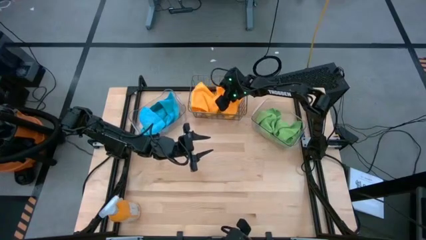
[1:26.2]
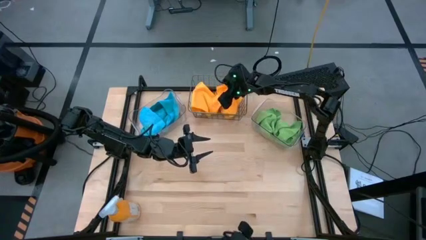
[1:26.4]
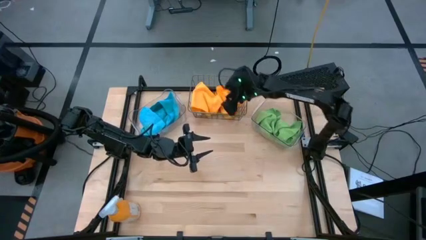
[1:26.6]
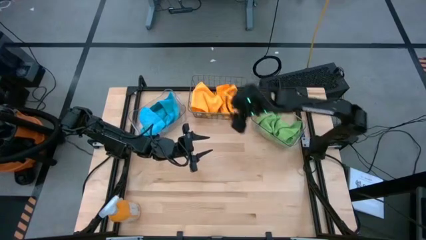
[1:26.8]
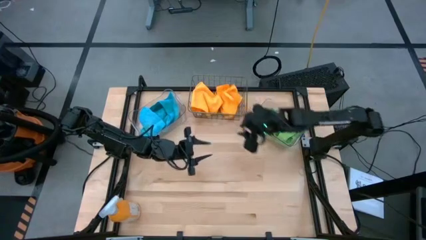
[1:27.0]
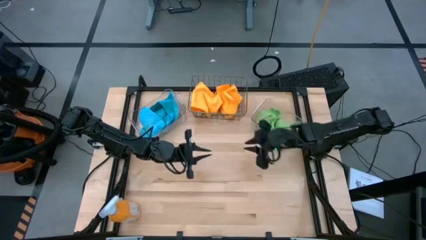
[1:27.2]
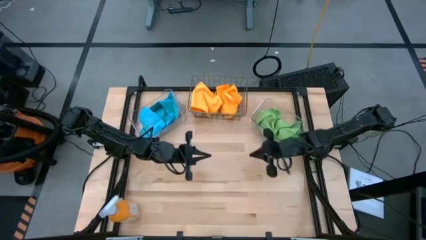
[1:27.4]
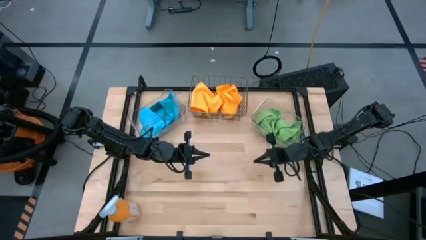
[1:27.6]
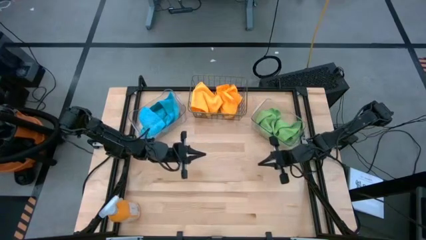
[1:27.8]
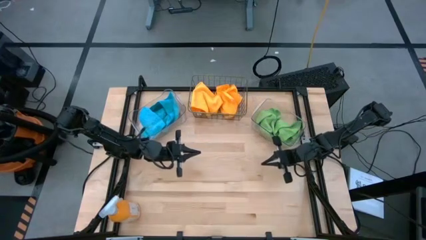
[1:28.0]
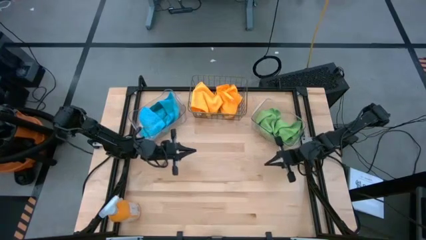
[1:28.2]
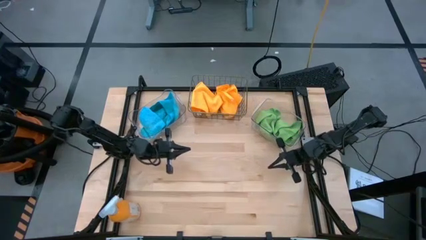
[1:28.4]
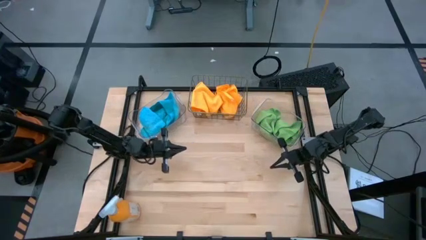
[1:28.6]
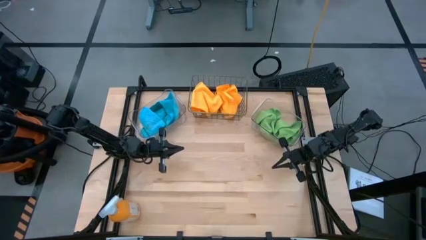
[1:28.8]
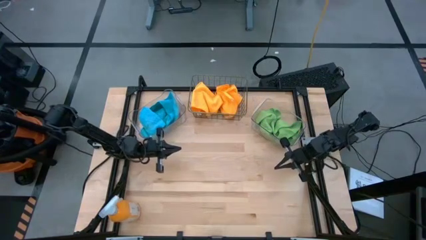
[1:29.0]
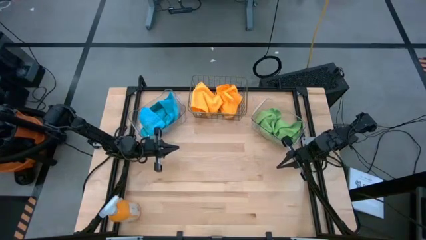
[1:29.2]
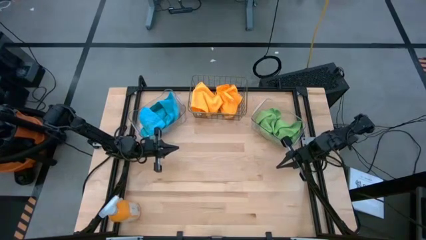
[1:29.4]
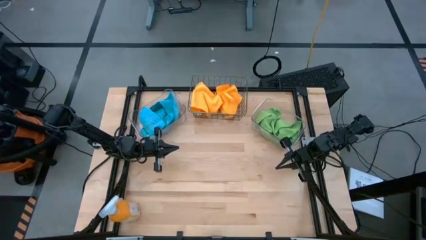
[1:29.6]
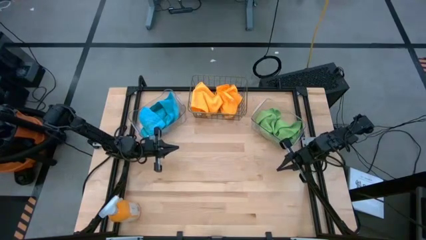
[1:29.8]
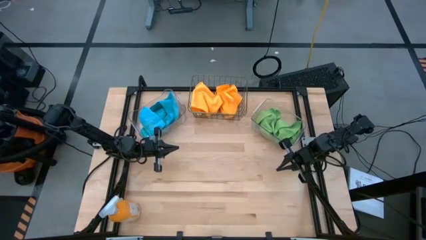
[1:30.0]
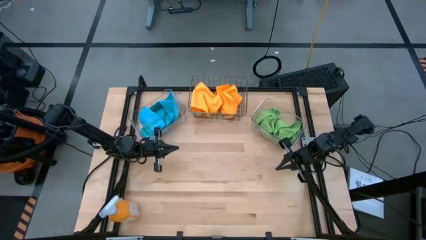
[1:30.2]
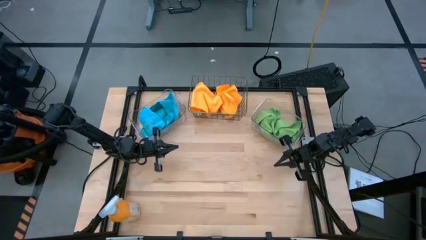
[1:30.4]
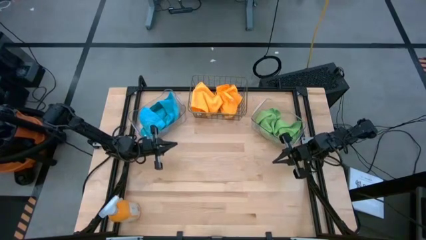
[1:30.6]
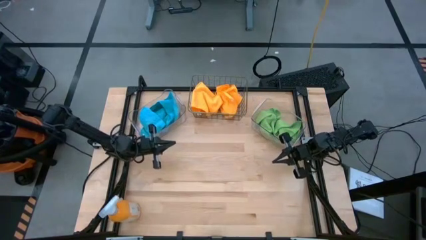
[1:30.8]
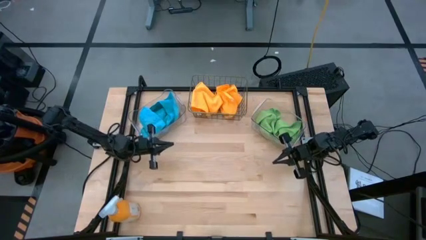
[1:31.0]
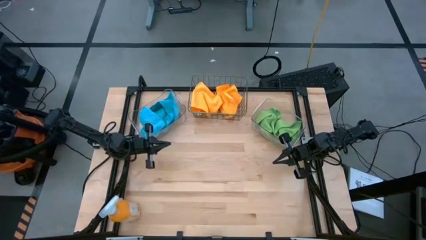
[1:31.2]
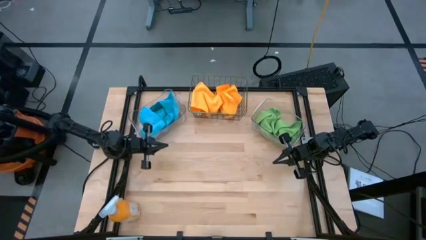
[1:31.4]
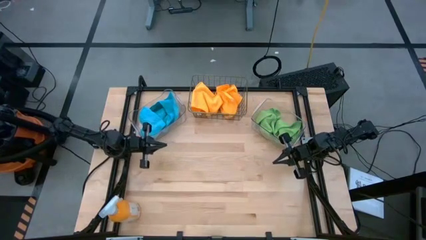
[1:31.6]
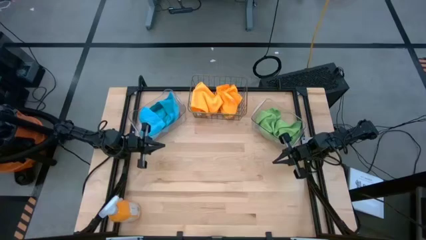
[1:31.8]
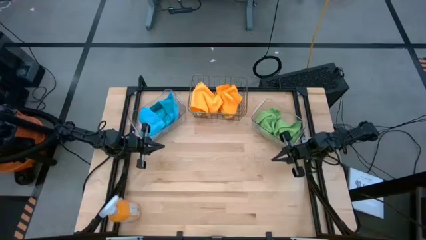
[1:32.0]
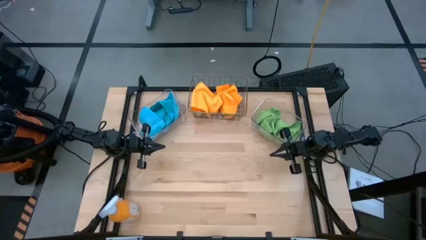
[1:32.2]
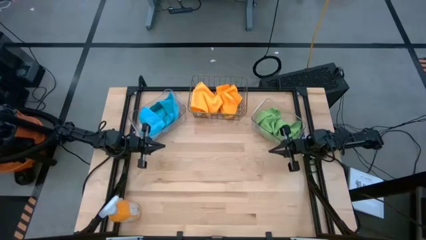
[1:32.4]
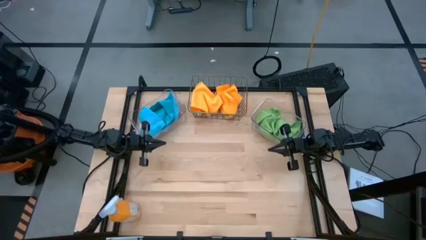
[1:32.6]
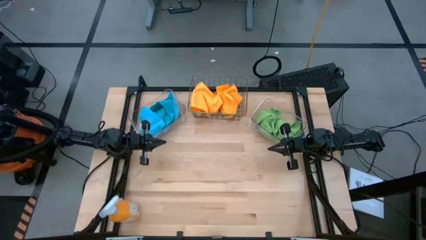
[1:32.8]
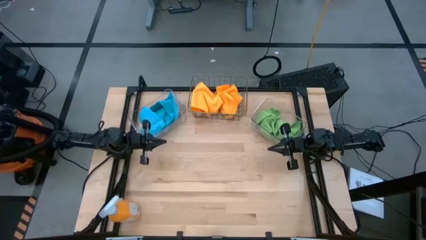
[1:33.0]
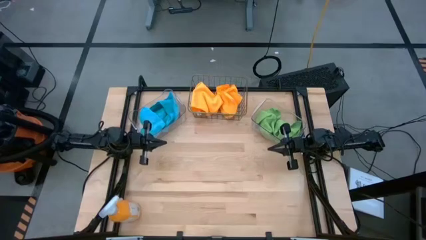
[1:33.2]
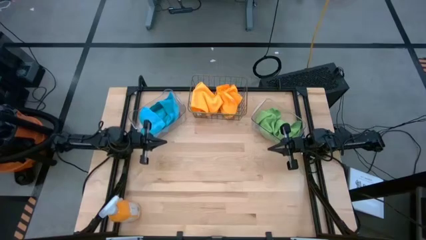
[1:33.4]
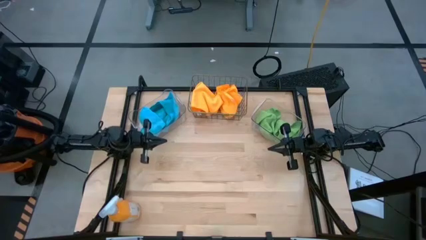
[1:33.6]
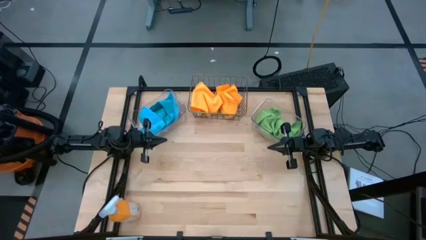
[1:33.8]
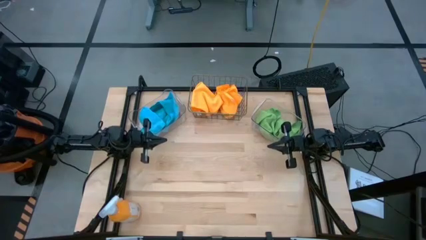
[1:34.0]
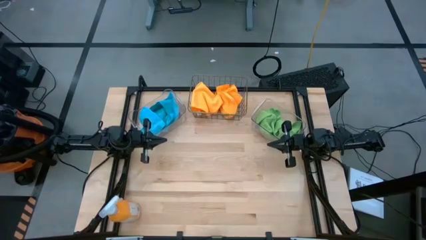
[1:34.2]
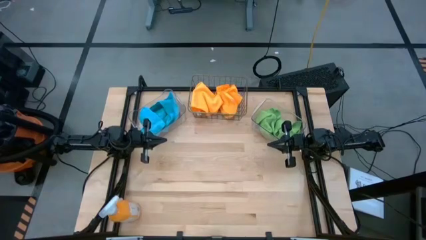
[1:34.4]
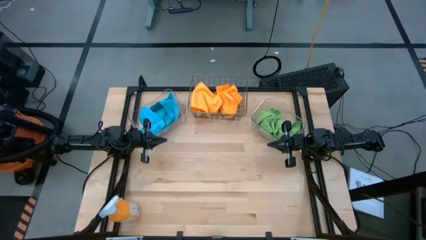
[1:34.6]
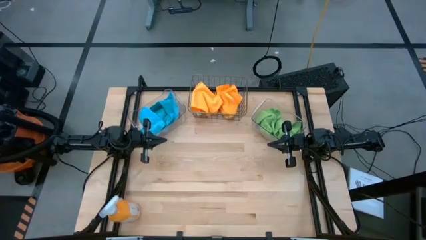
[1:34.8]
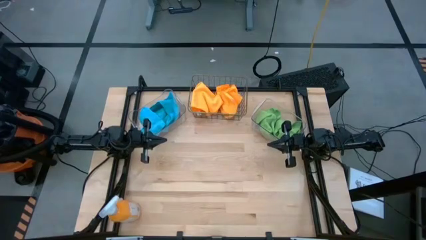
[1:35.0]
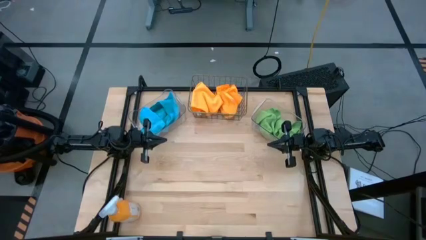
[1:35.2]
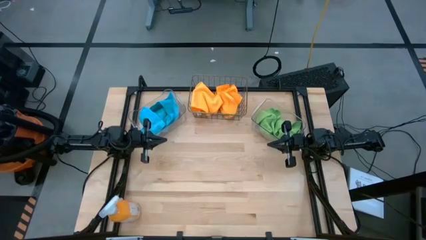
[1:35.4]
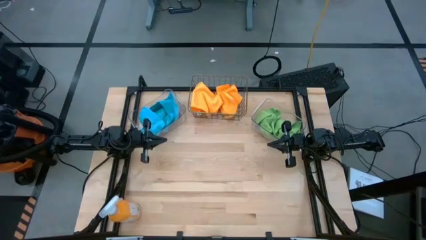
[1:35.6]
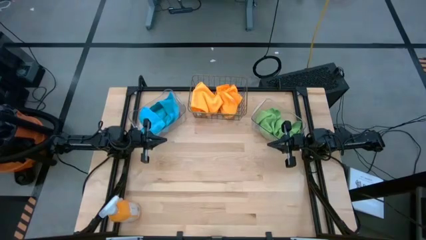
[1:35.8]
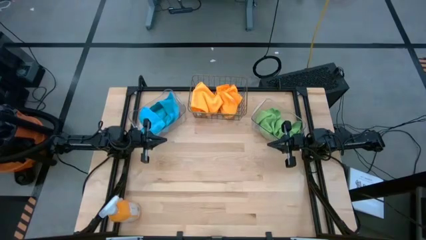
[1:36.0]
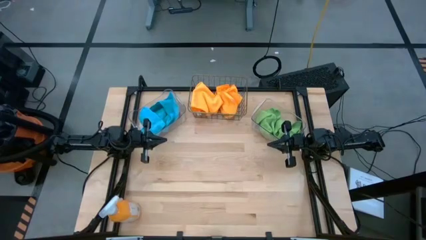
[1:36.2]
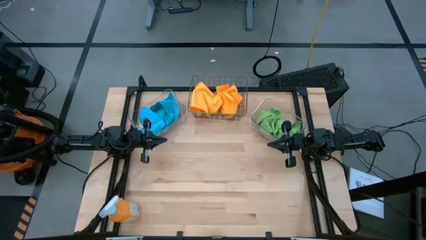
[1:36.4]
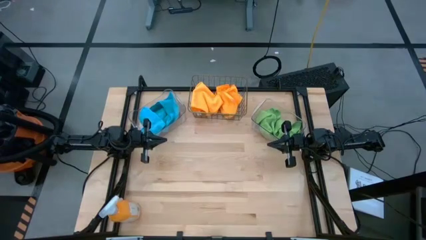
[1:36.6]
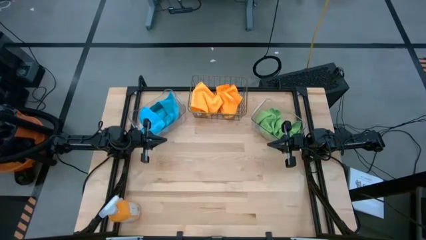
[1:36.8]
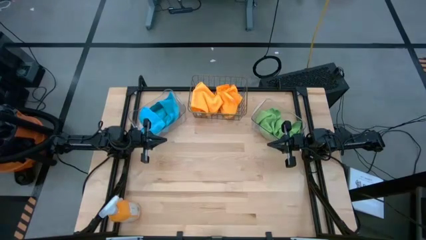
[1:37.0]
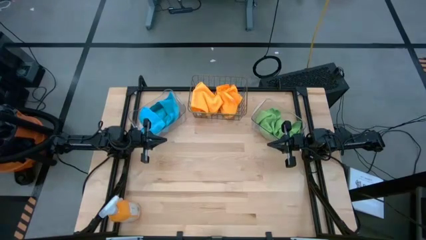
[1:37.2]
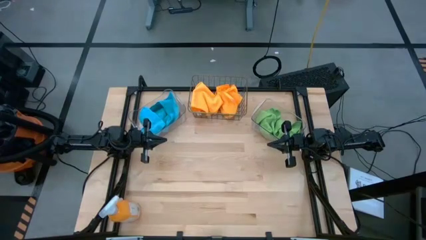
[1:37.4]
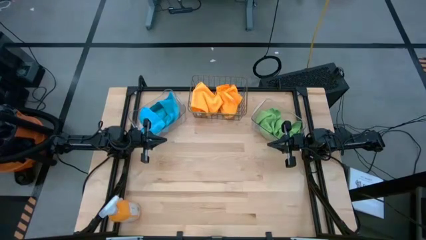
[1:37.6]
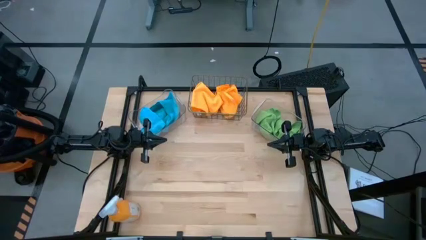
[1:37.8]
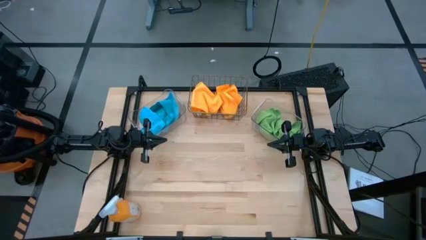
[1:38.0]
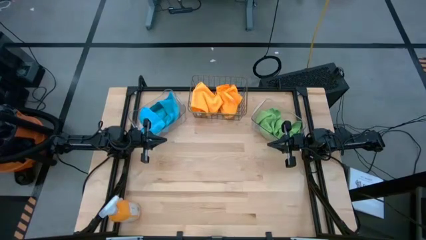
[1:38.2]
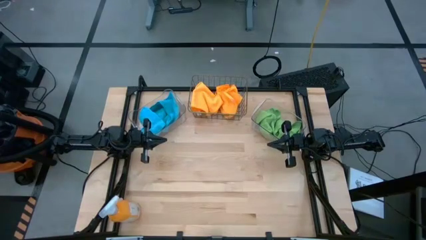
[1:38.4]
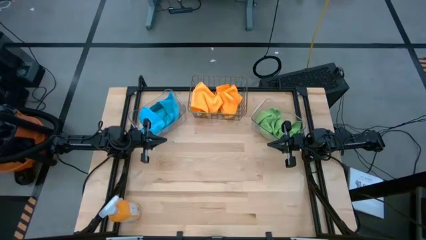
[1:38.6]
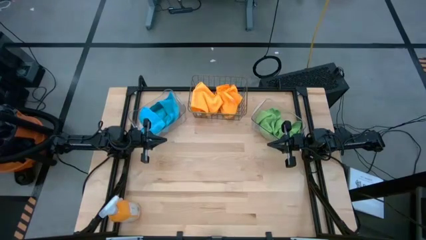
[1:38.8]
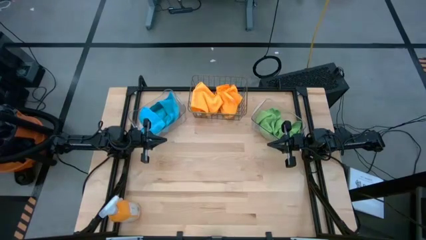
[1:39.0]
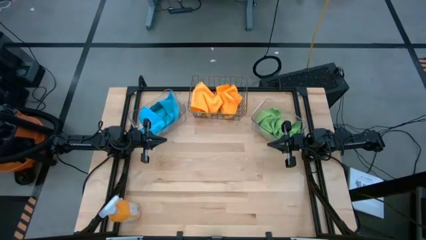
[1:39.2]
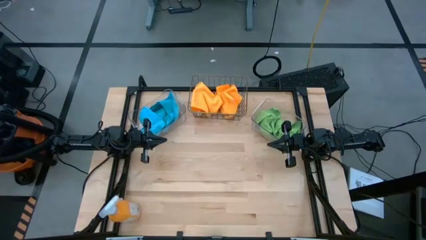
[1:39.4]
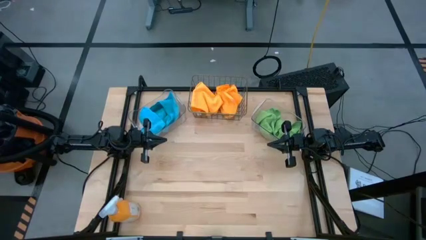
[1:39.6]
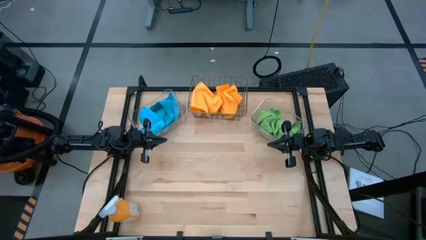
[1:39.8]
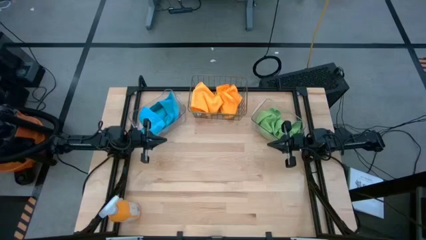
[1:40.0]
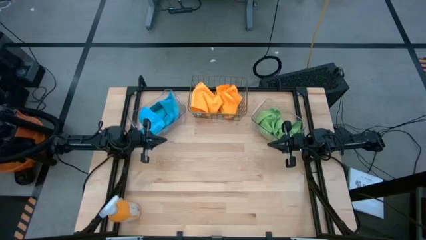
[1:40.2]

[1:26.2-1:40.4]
Task: Sort microfiber towel by color & place in baskets
Return to Home Position
